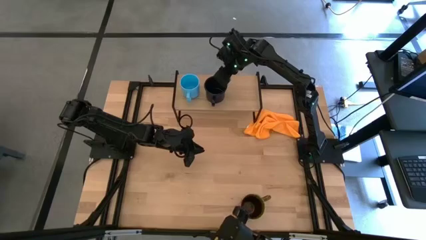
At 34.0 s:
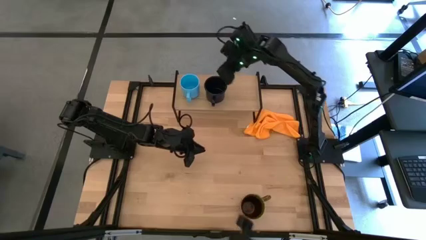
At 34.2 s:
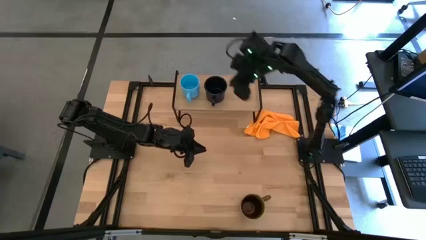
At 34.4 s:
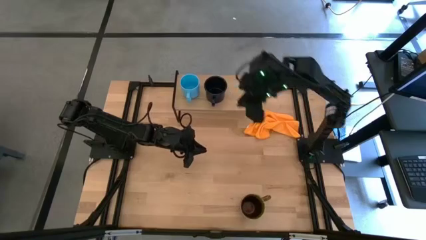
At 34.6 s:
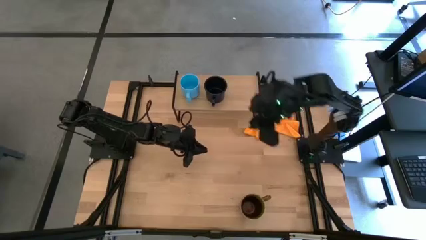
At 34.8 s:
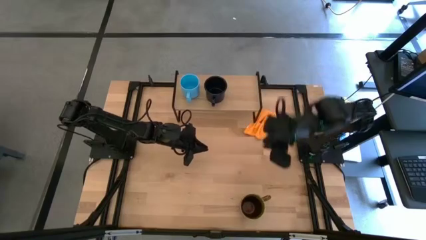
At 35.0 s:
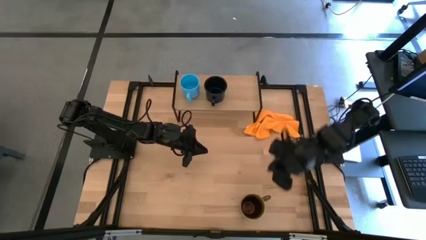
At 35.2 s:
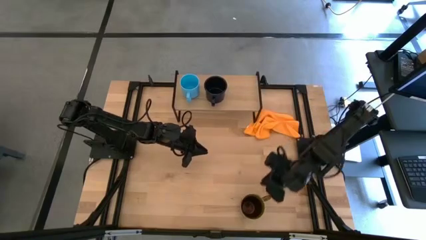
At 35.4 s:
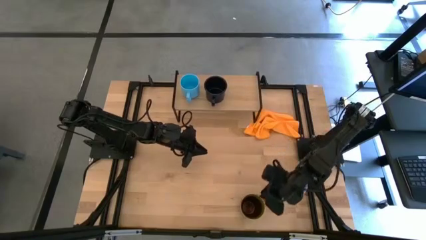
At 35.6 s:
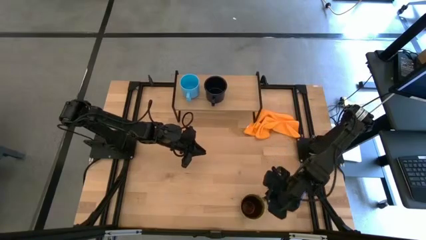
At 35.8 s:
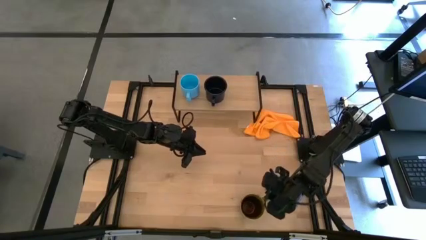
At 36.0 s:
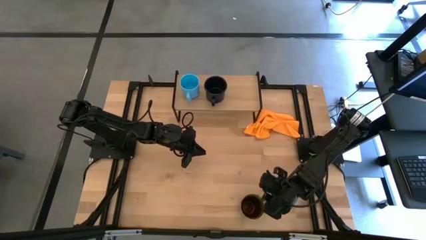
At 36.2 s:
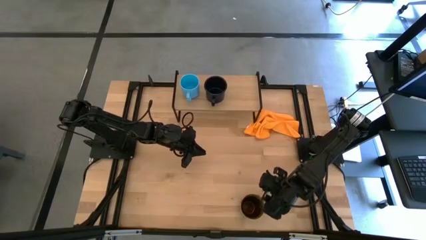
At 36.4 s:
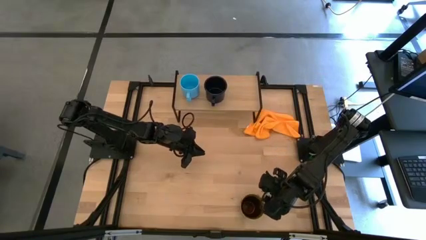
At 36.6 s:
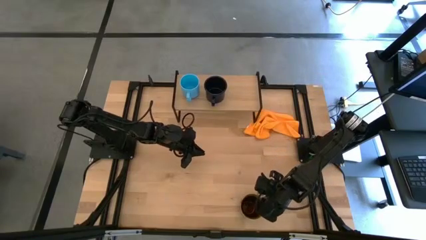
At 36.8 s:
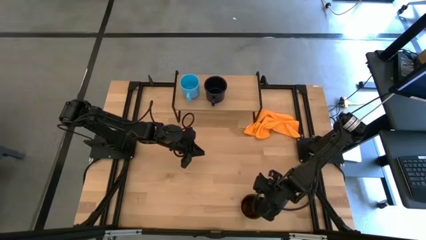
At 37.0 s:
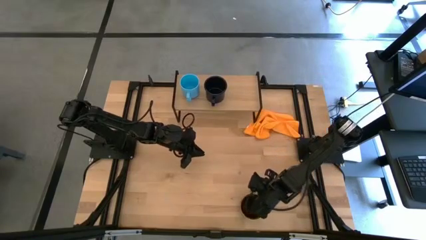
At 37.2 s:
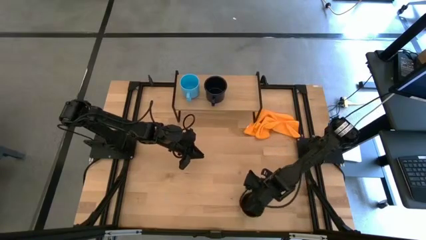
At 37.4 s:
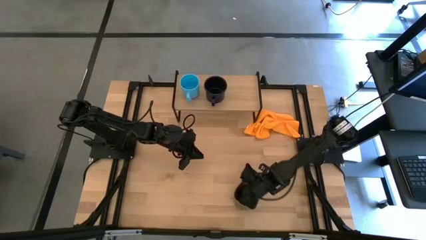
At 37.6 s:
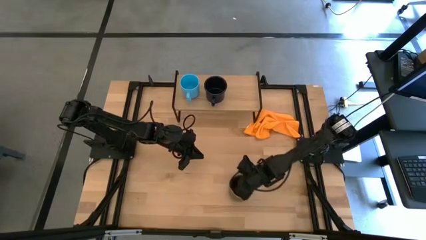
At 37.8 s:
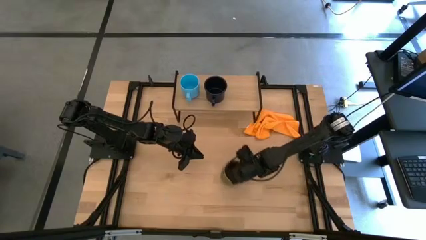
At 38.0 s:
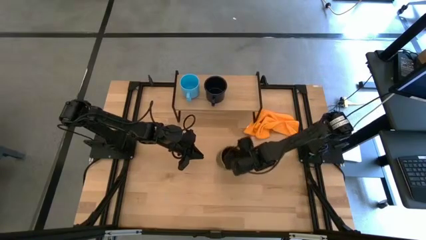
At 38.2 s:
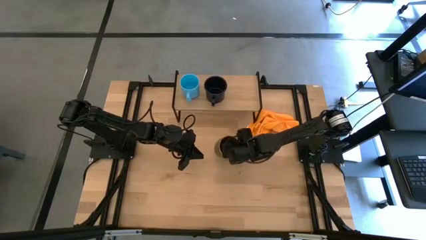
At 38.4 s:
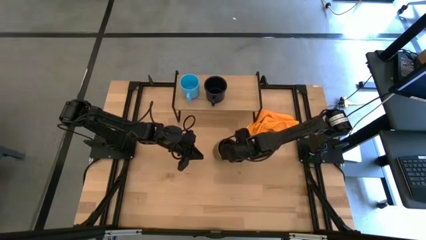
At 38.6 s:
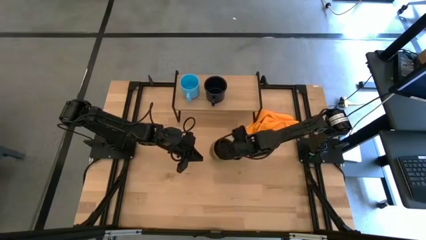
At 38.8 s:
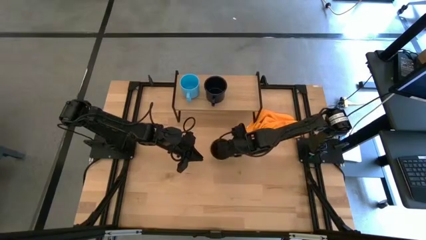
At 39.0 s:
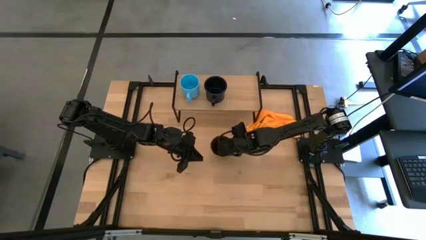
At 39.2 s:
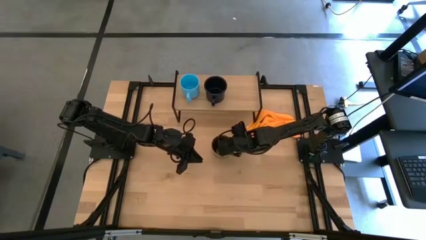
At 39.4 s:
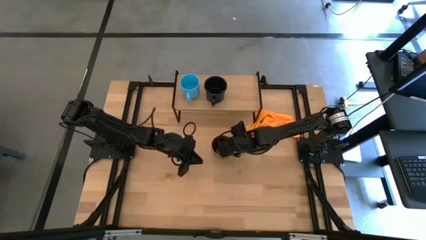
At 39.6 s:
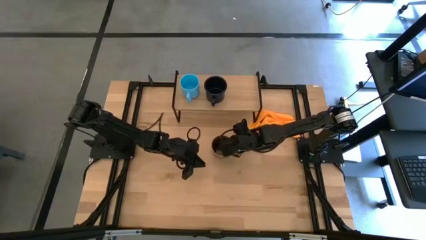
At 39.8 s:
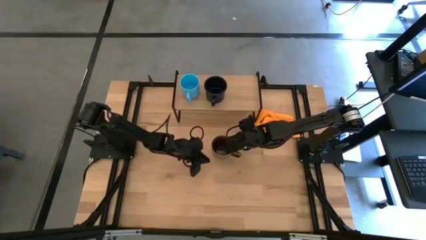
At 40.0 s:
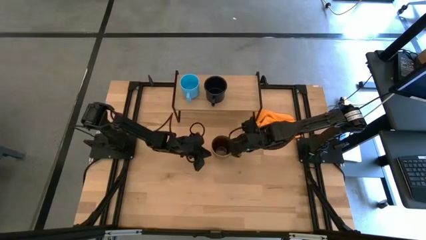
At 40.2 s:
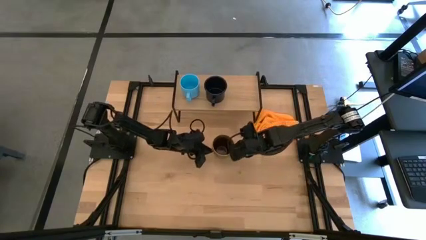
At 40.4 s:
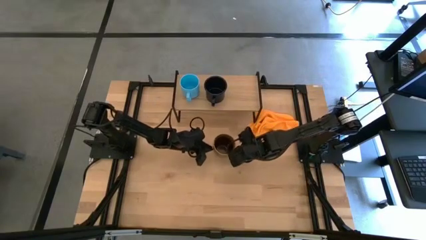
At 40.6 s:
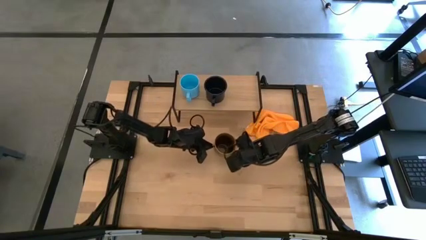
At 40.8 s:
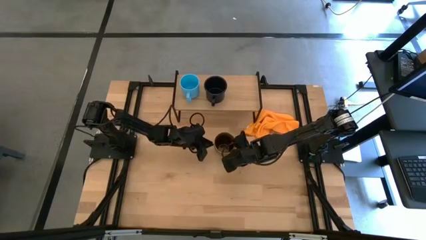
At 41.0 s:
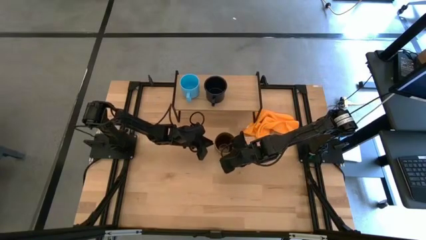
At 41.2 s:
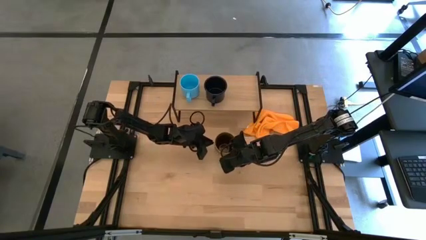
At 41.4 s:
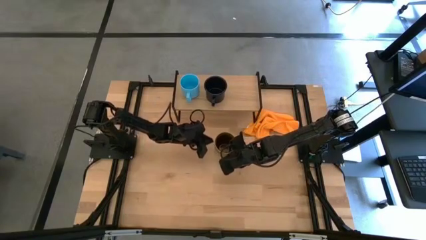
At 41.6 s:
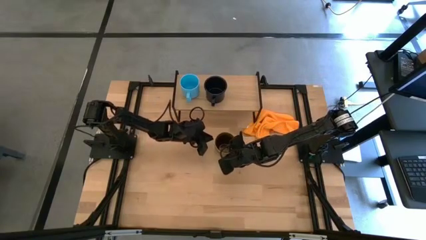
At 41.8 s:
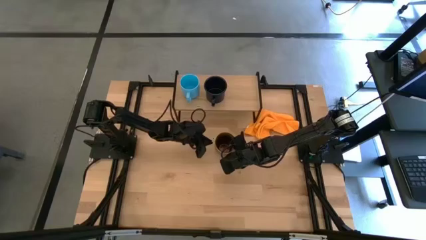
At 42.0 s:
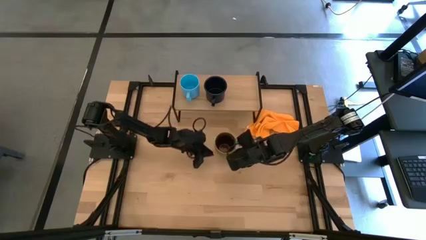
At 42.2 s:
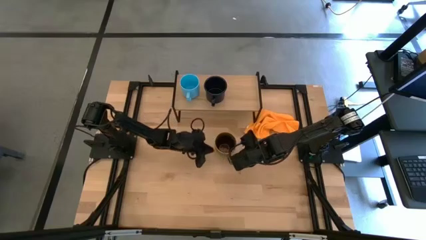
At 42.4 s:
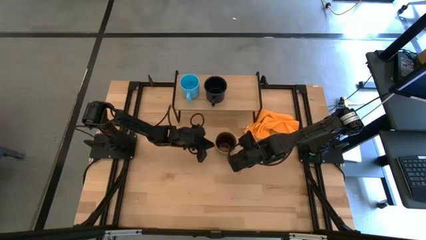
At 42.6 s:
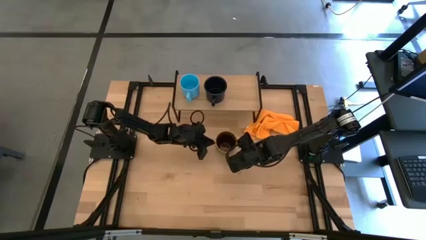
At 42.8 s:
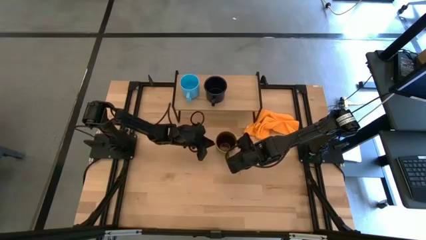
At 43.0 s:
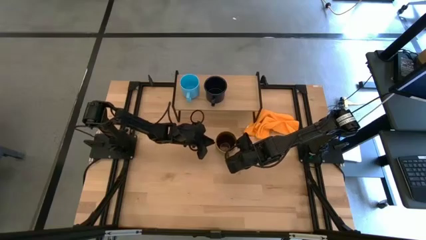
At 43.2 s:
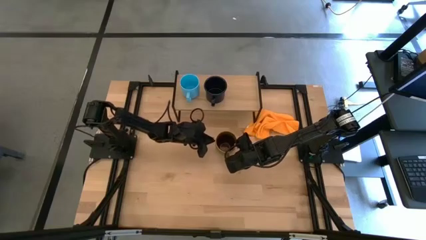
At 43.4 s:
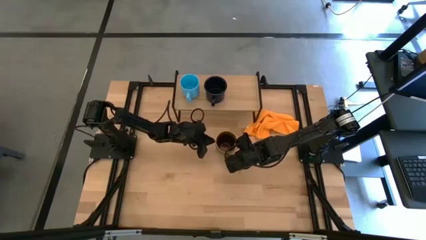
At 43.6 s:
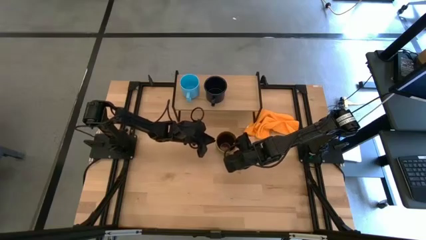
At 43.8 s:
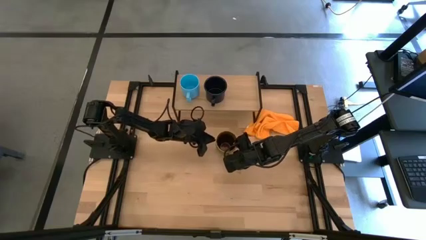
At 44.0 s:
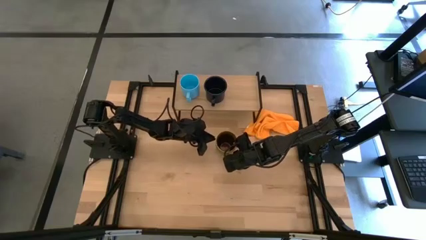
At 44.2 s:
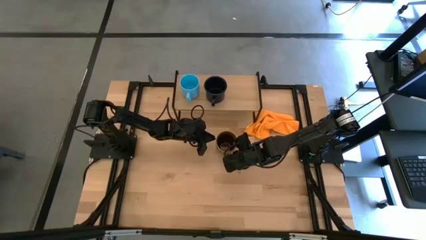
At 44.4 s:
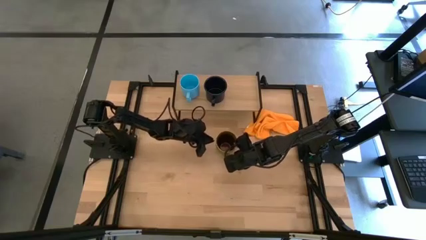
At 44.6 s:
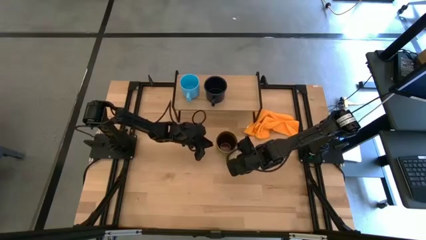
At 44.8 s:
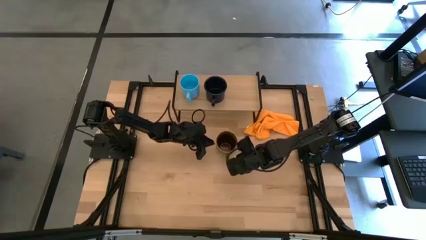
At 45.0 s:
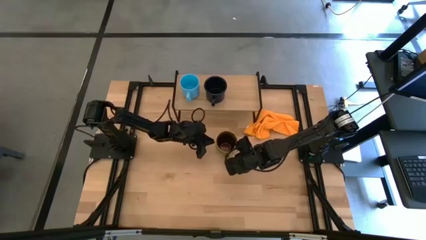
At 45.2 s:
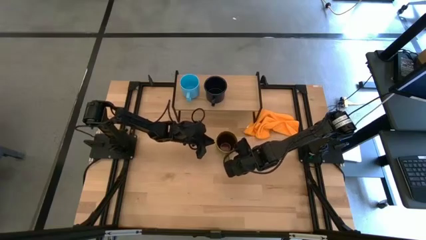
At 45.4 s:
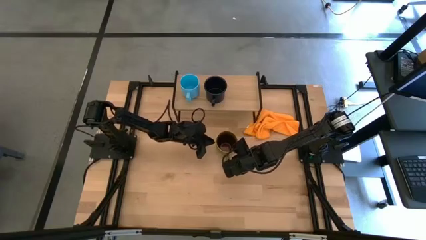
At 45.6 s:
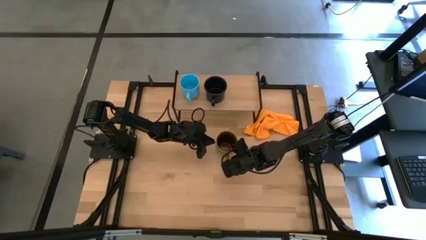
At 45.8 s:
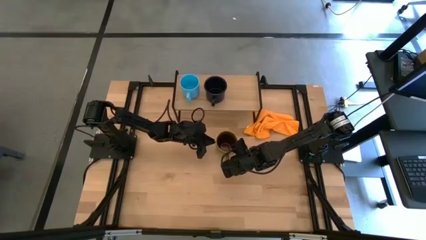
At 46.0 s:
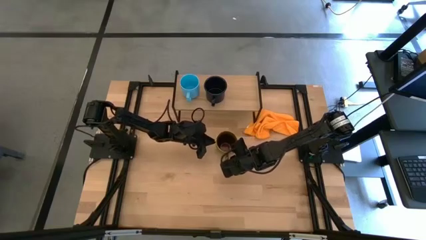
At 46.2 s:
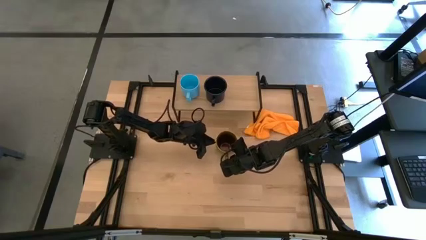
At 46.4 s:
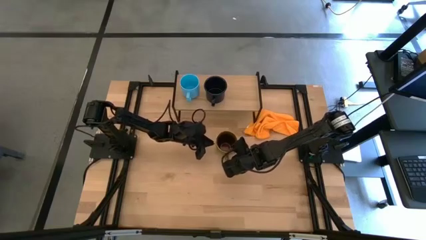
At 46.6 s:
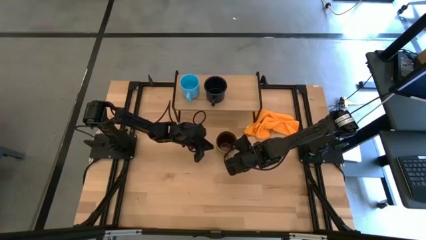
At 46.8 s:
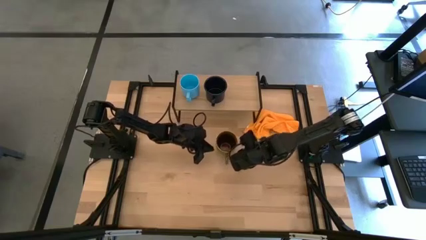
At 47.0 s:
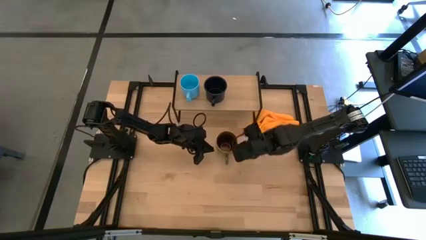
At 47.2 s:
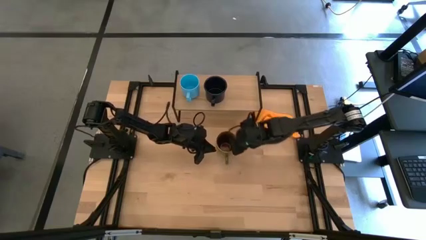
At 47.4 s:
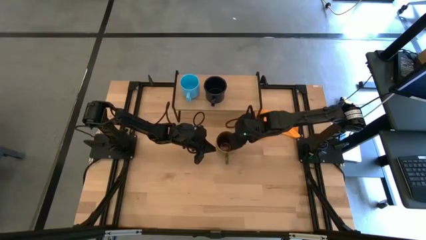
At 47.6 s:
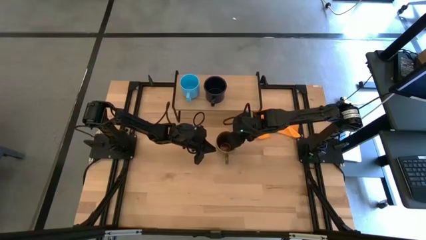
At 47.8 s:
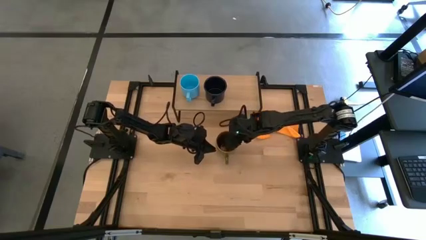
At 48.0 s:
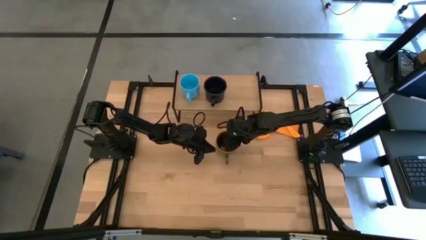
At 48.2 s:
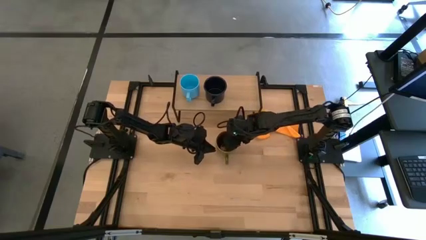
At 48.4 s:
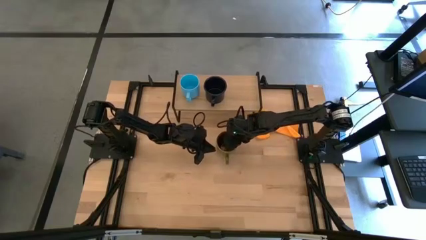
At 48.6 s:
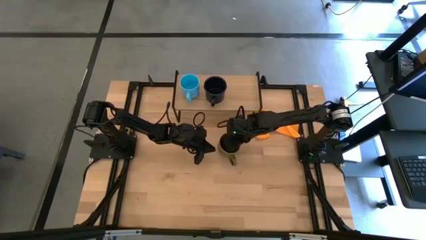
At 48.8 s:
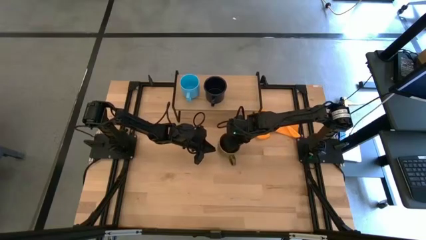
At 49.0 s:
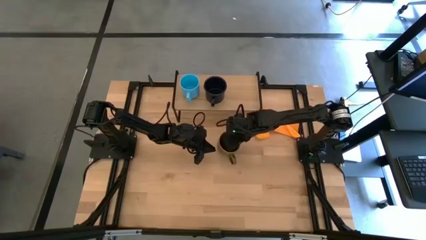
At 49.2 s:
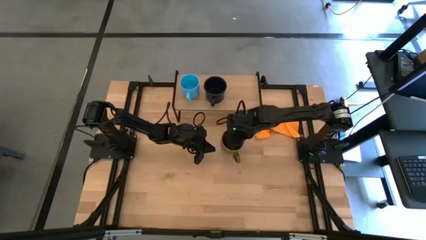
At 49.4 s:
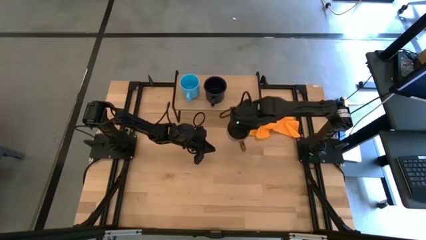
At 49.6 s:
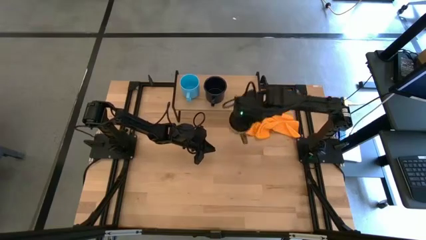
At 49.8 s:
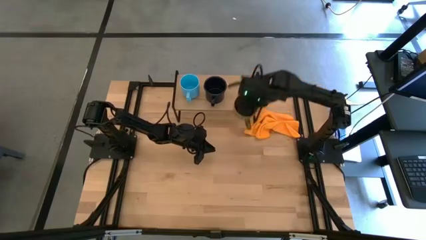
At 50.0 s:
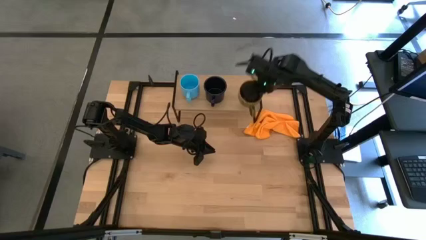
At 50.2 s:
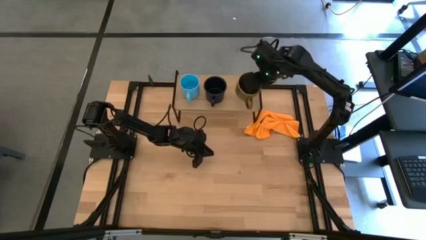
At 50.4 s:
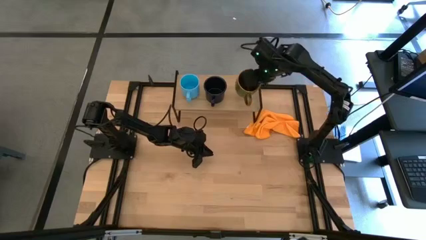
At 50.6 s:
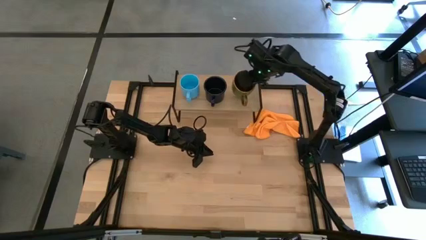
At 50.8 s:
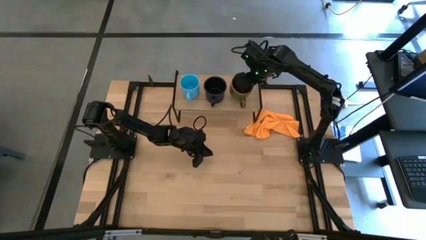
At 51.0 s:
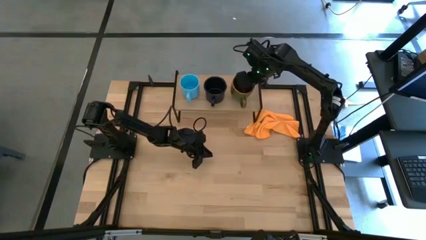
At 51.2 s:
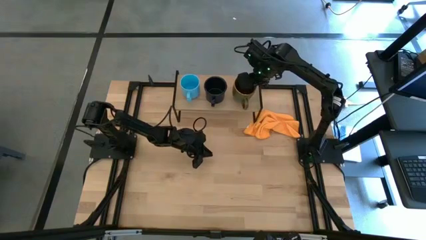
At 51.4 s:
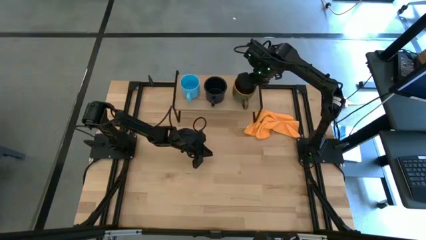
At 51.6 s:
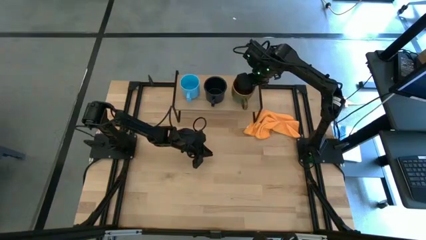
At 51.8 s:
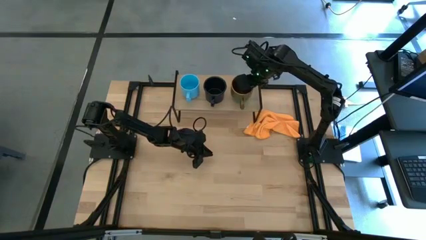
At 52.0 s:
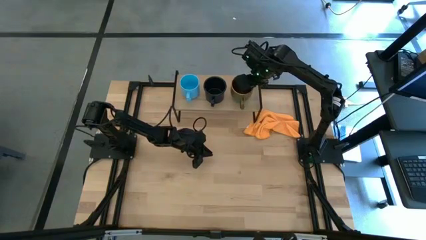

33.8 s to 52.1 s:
Task: Stack small to large cups/mugs on shelf
Put the green mug on the shelf
